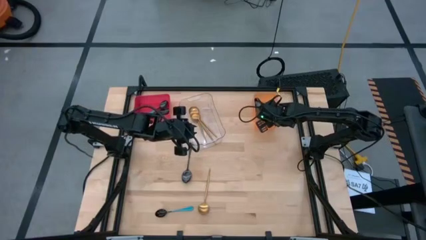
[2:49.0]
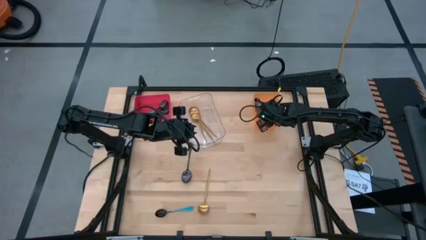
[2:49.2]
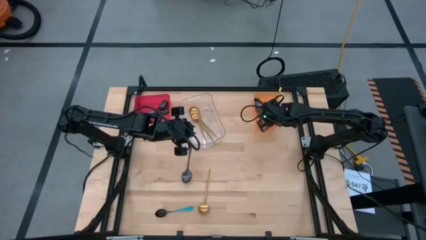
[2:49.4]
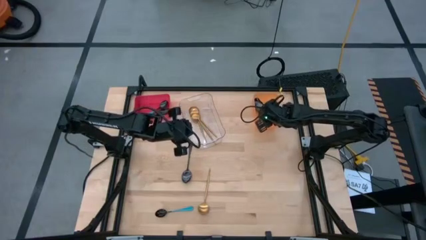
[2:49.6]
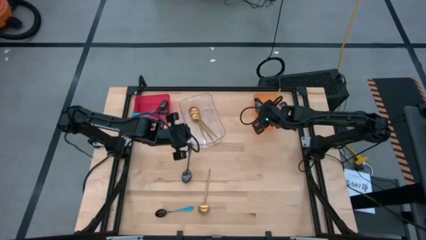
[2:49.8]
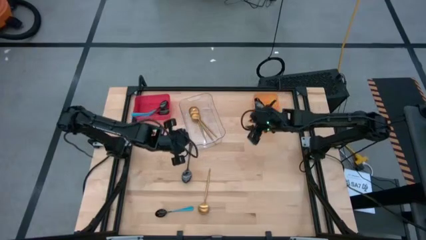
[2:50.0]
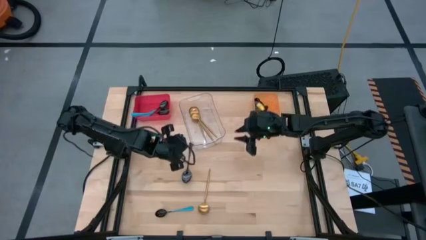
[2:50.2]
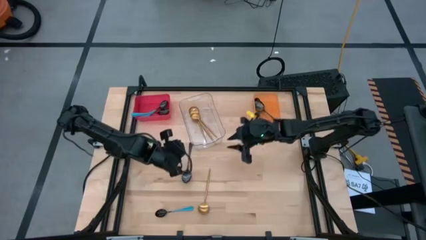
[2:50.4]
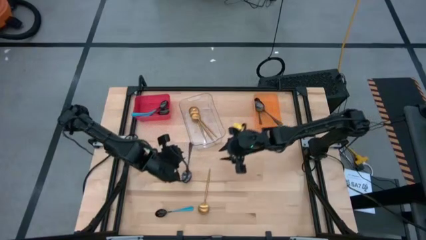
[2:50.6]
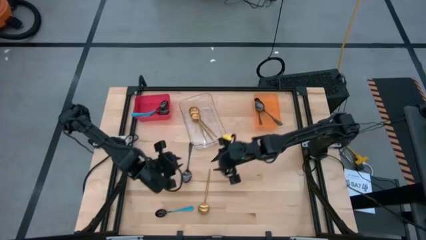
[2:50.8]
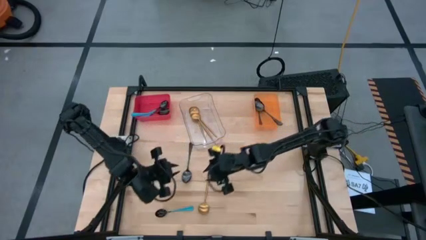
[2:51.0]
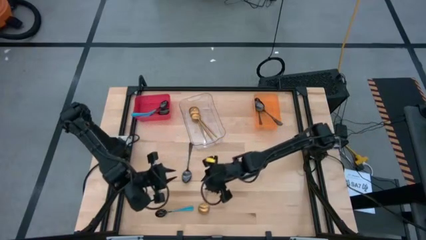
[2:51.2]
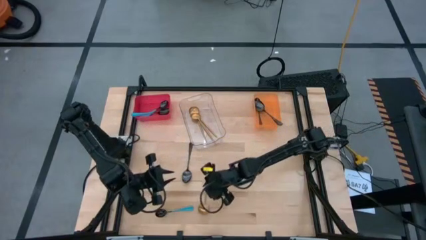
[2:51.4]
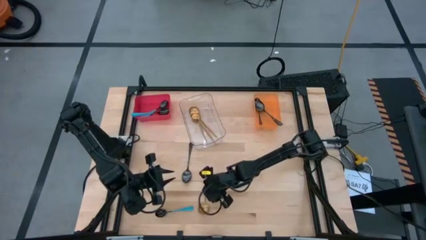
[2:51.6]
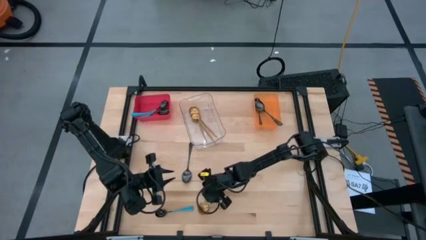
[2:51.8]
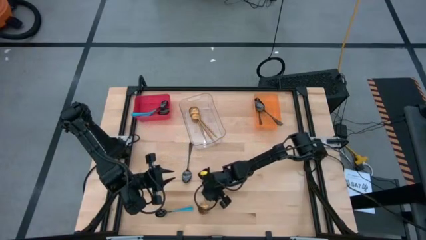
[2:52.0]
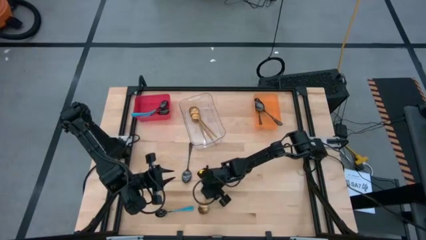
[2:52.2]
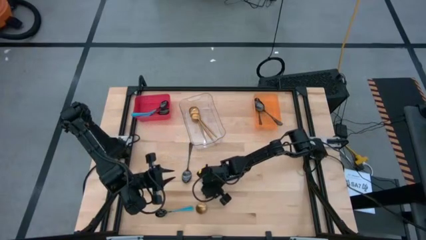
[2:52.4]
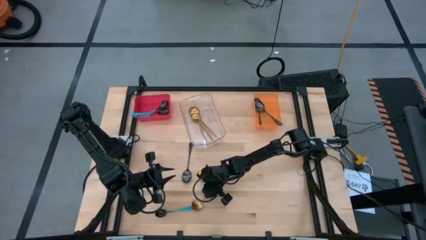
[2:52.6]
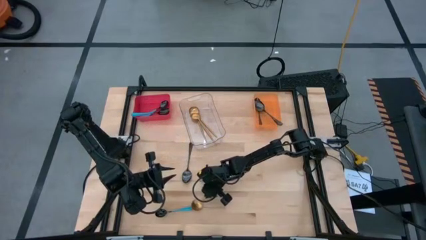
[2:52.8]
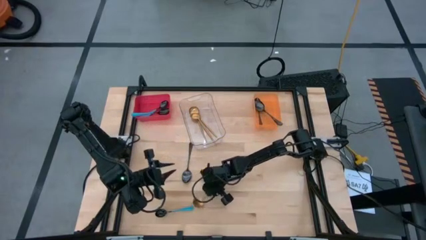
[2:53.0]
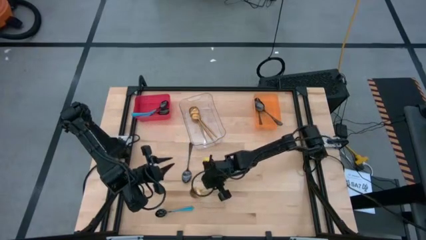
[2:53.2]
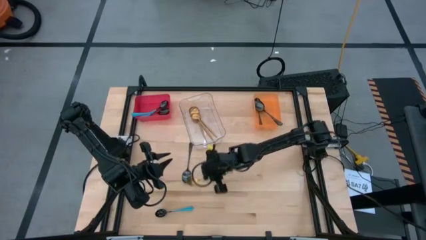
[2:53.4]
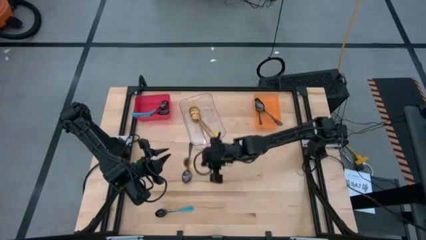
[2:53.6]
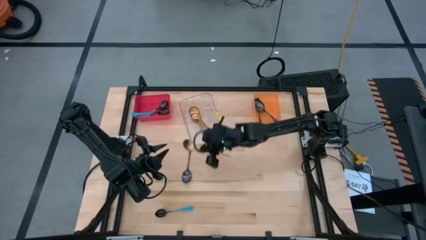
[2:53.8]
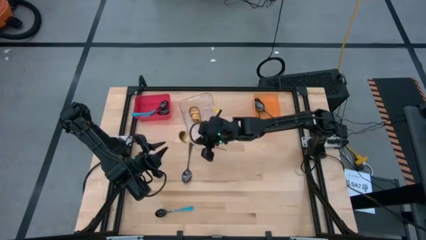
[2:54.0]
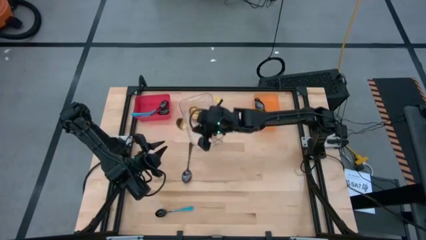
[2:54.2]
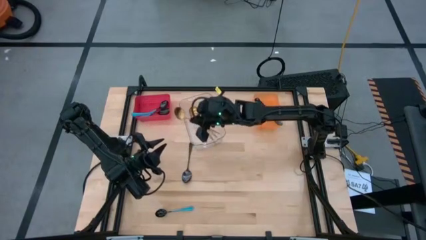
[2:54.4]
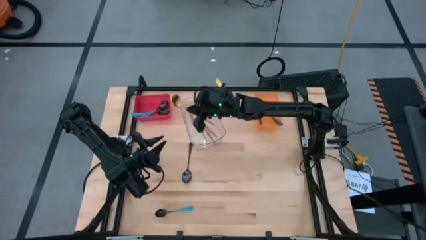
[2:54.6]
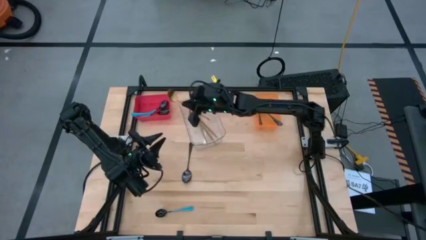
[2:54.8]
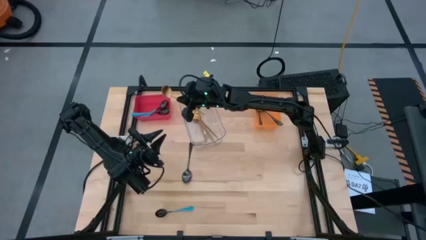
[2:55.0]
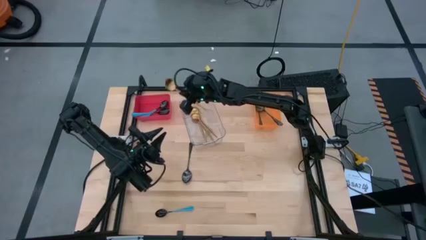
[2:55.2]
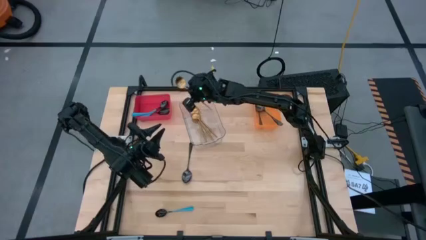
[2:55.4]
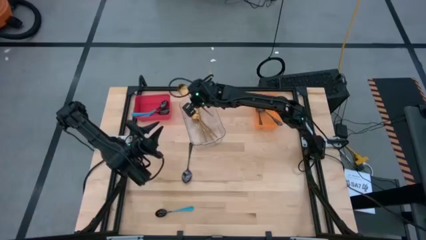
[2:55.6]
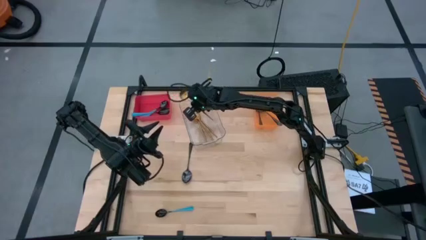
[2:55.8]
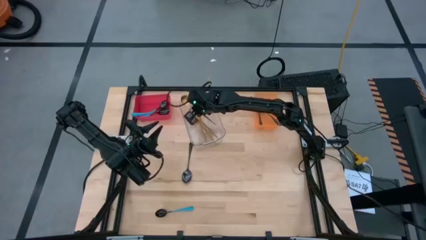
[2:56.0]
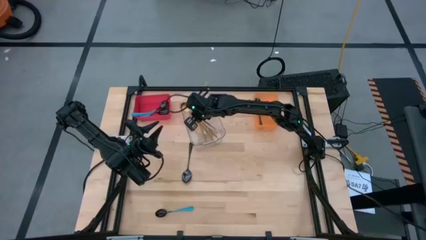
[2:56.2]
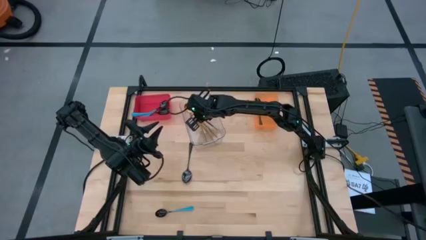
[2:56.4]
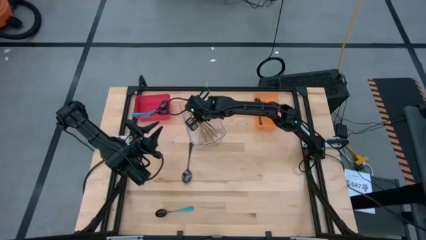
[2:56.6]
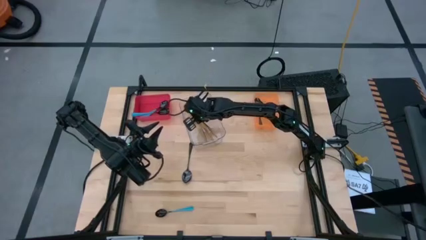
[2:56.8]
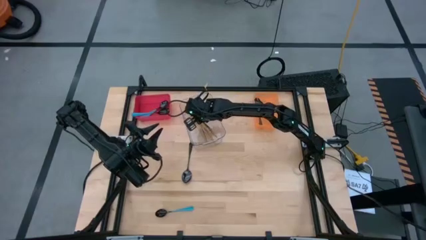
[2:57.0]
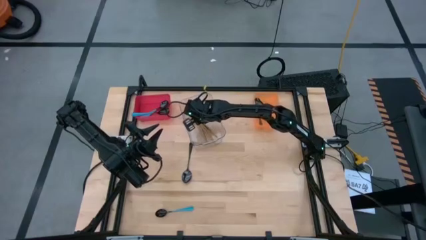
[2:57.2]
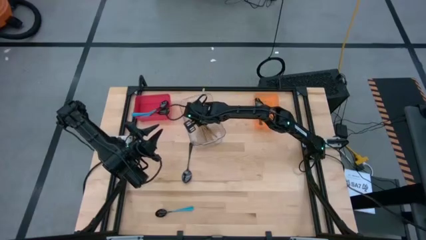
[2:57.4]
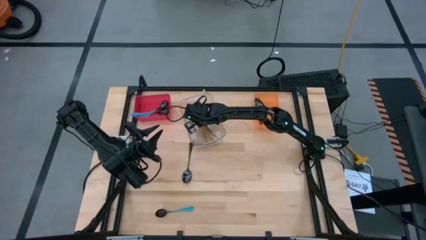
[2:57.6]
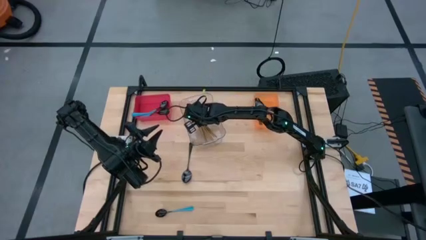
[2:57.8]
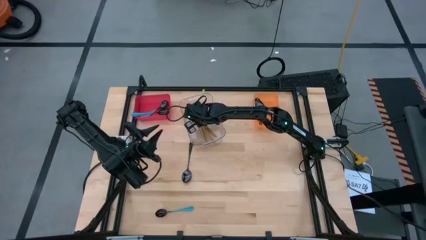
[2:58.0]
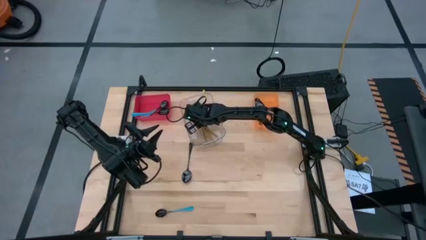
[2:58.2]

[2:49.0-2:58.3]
Task: Sort silverware by color (type)
Put the gold spoon into the transparent bin

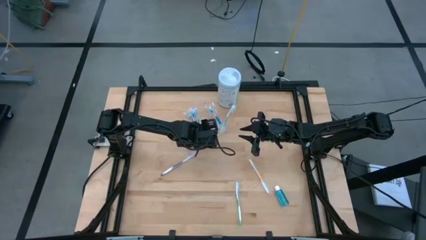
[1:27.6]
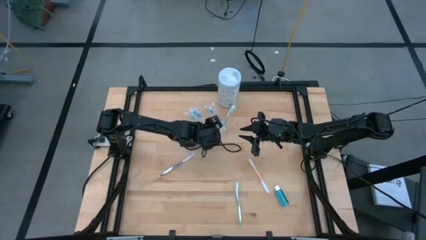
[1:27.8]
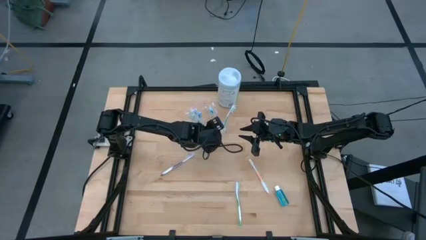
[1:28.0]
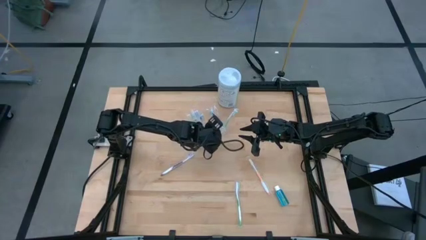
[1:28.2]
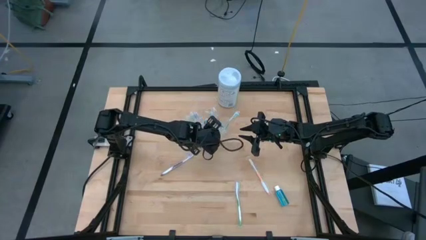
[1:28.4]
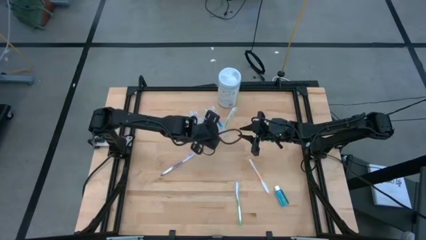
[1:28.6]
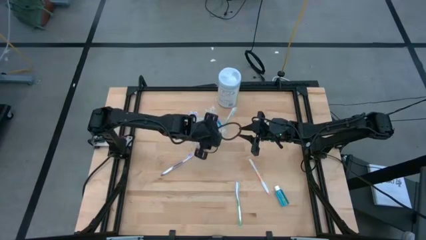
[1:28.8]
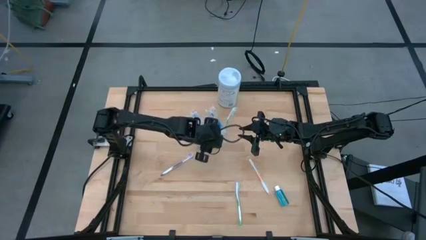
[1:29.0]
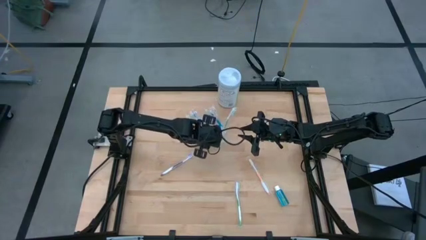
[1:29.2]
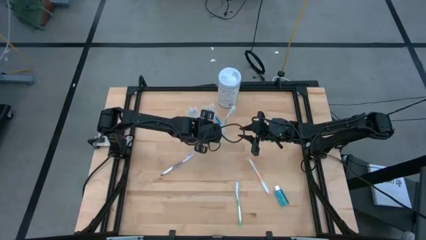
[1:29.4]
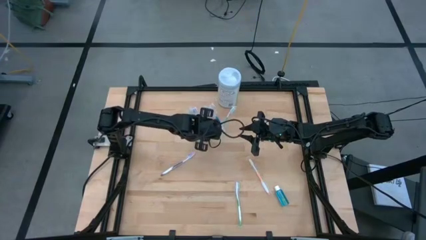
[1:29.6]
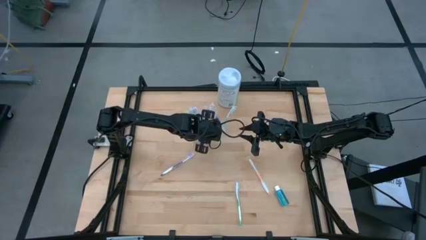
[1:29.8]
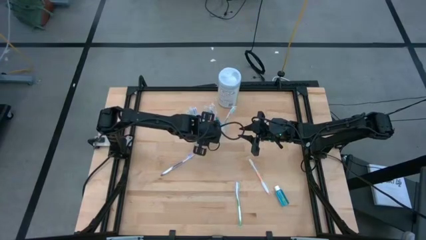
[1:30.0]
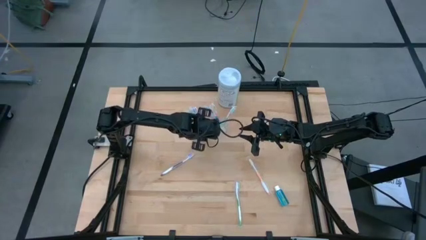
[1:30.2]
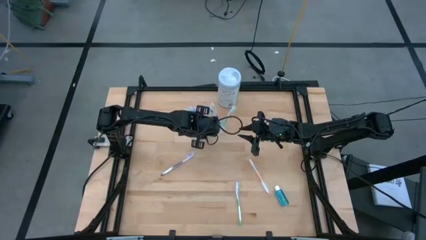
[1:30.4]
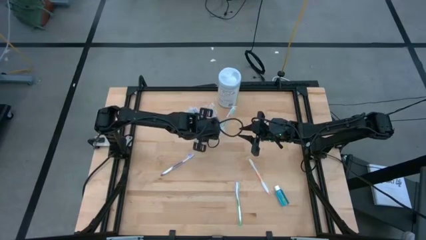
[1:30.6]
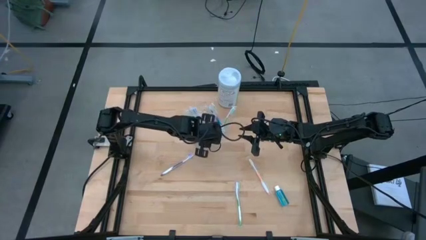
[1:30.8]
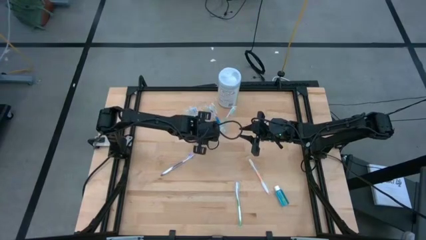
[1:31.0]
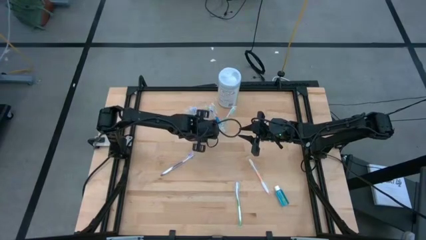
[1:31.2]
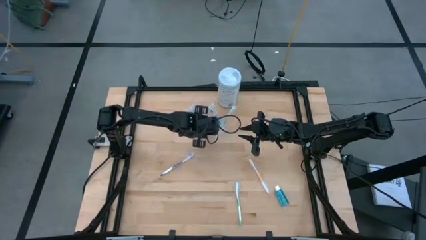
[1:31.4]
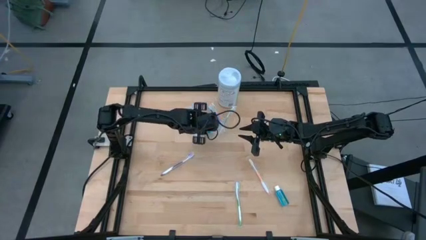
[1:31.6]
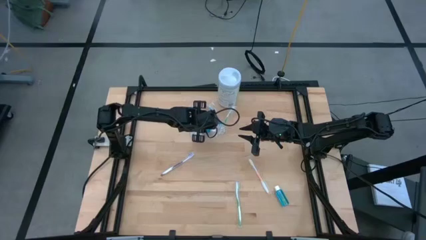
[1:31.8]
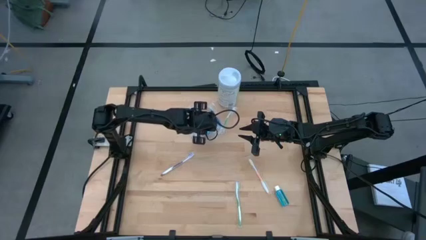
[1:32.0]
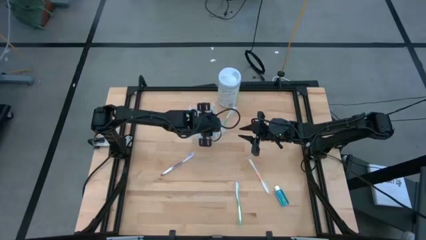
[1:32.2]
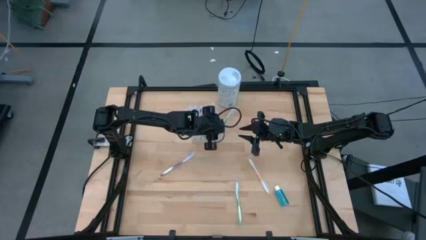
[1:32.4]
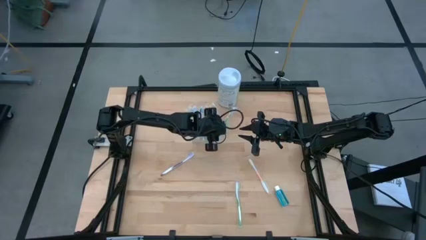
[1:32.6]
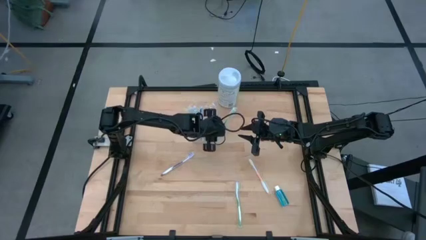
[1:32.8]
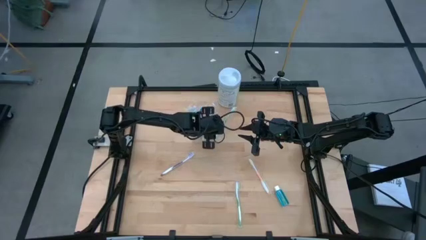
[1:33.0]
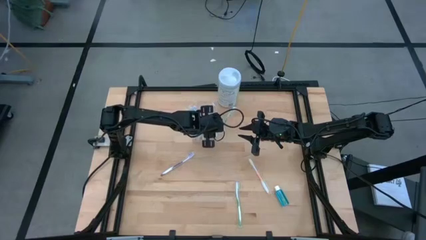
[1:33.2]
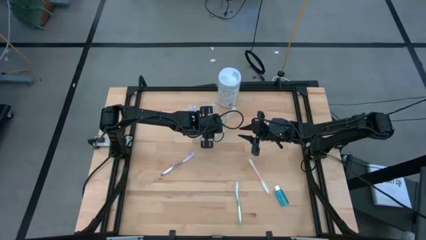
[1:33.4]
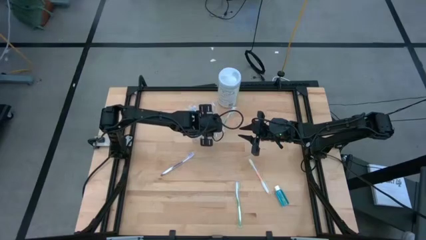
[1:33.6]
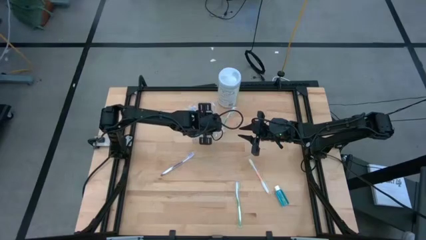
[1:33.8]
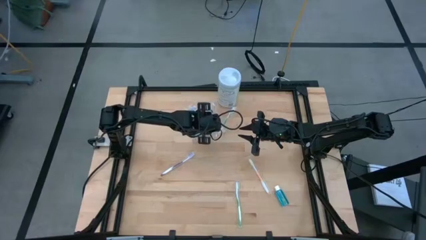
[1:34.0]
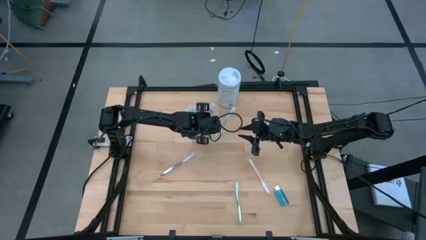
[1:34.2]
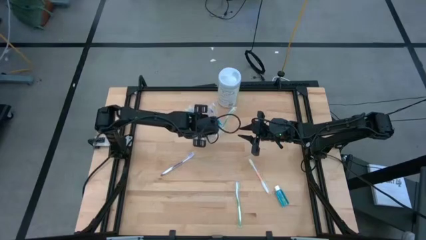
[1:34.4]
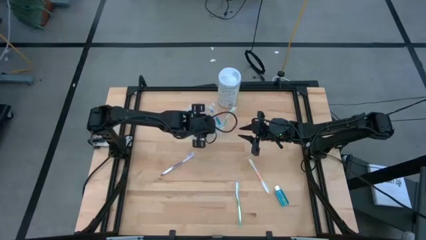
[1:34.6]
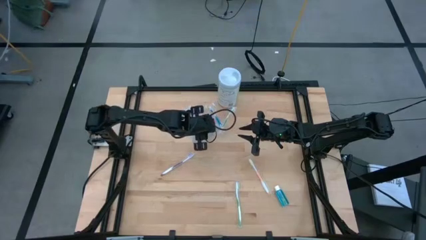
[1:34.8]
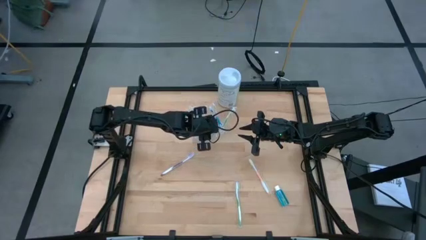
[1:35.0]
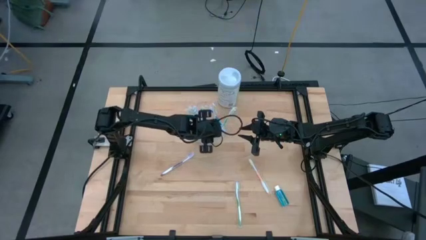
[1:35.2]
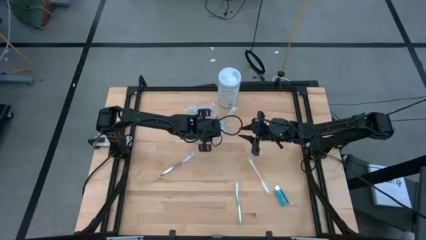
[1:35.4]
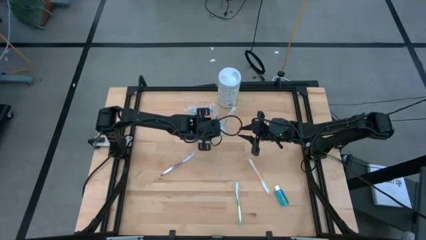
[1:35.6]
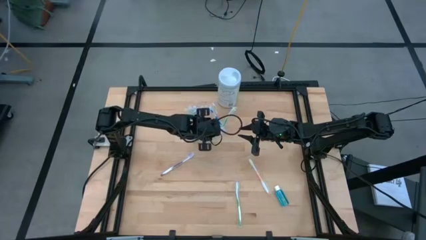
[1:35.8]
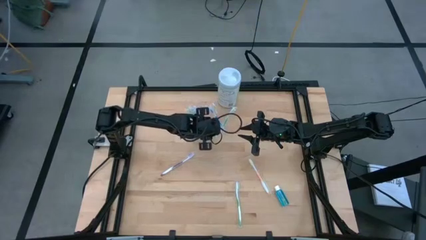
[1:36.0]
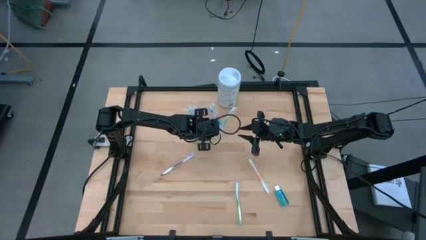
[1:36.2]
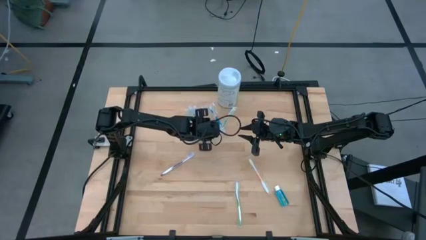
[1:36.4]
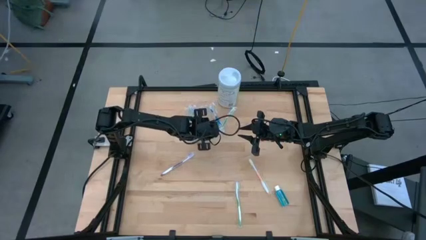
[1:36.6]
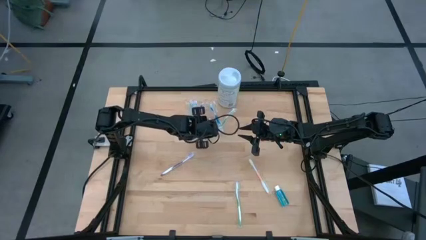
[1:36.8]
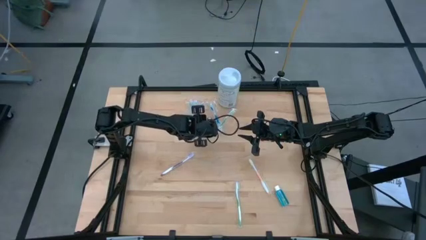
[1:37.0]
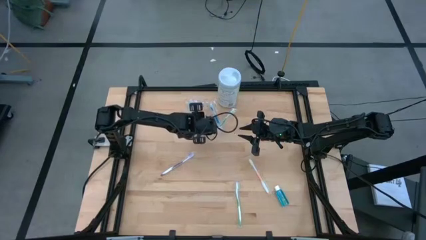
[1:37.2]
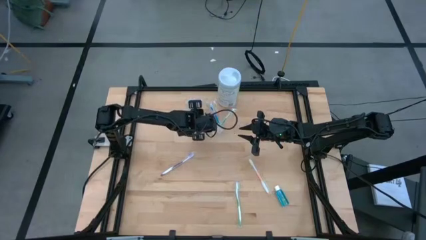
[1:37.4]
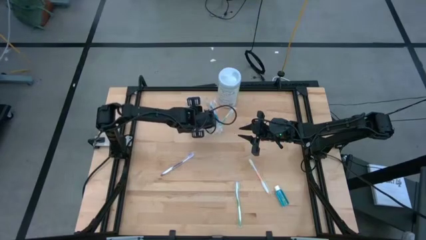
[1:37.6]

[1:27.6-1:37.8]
Task: Pick & Place toothbrushing station
Put the blue mouthwash into the transparent organizer
